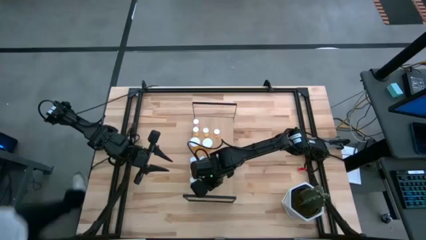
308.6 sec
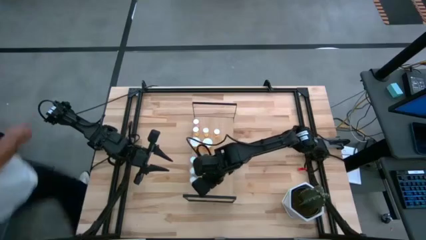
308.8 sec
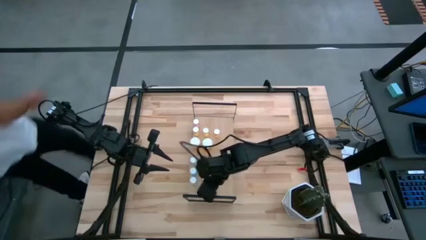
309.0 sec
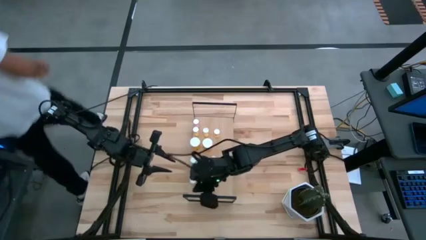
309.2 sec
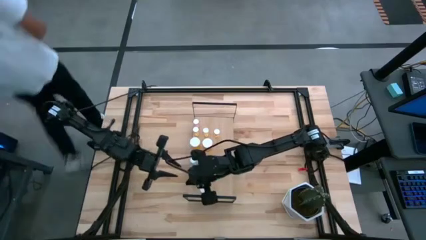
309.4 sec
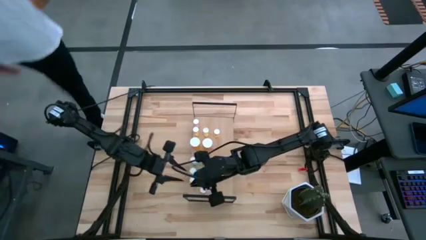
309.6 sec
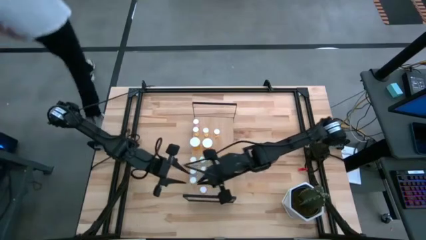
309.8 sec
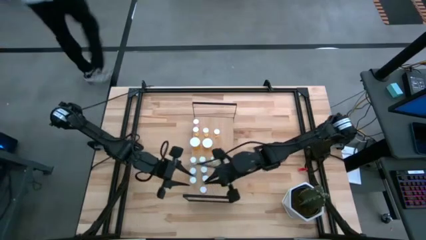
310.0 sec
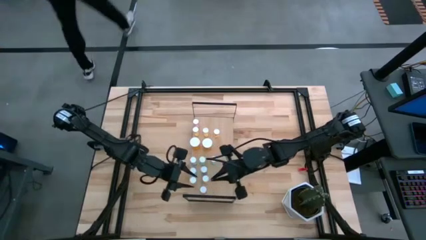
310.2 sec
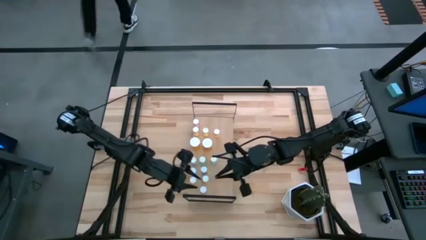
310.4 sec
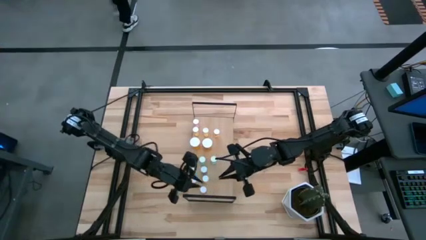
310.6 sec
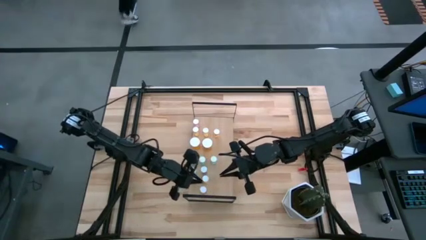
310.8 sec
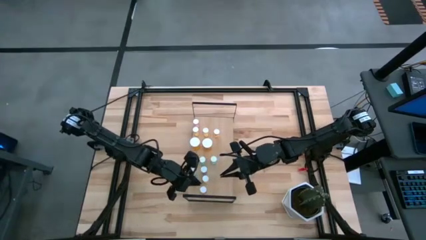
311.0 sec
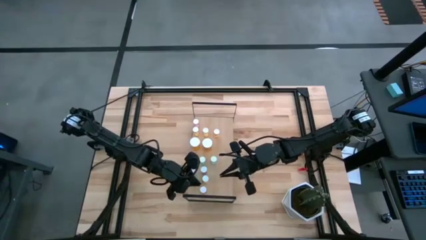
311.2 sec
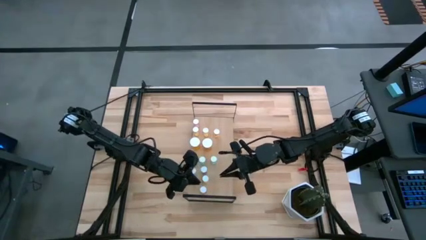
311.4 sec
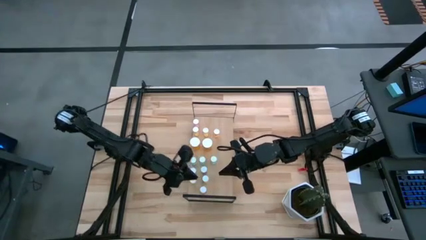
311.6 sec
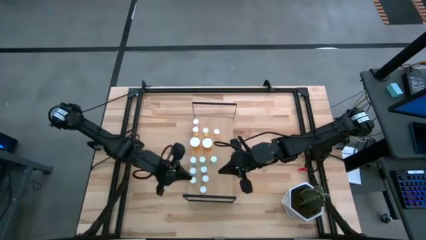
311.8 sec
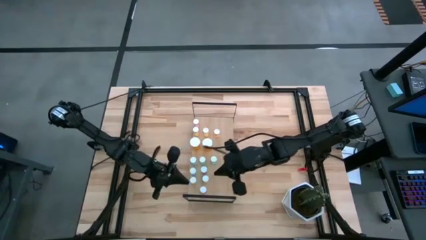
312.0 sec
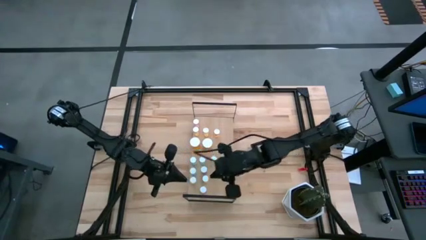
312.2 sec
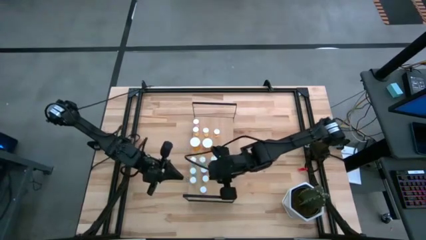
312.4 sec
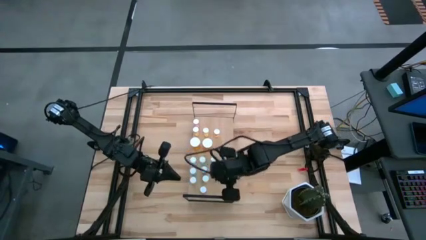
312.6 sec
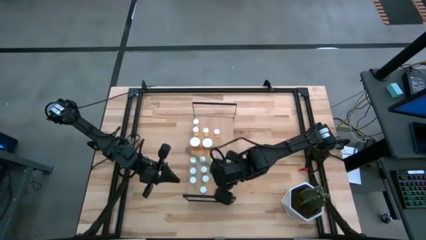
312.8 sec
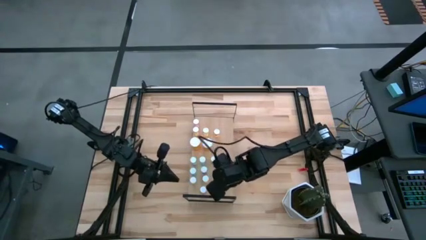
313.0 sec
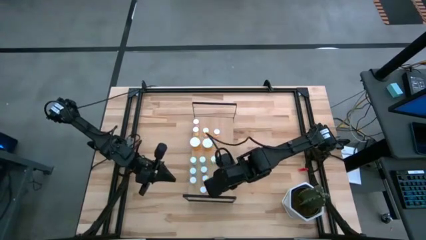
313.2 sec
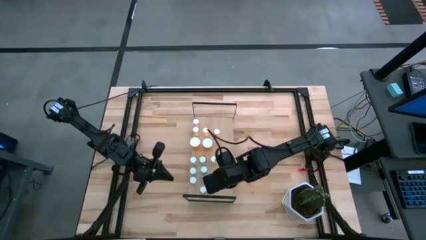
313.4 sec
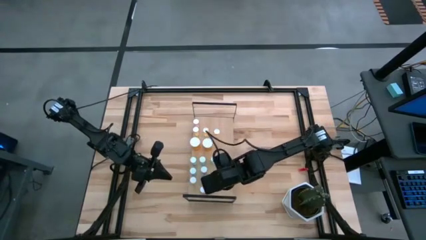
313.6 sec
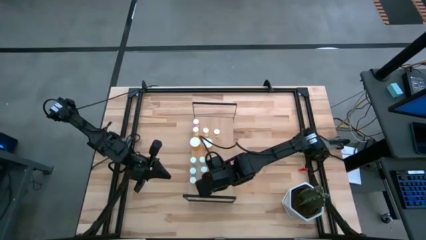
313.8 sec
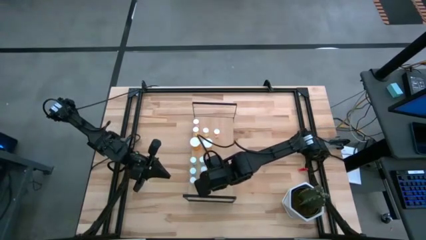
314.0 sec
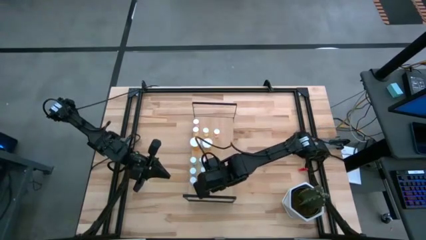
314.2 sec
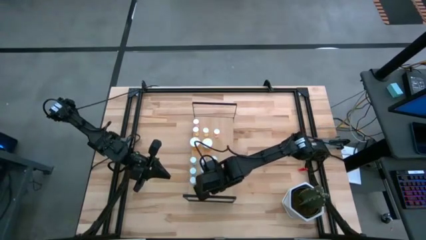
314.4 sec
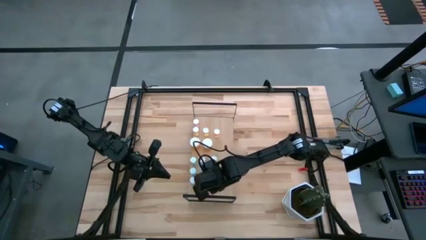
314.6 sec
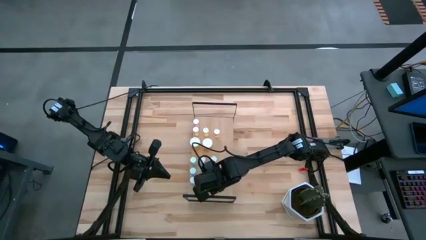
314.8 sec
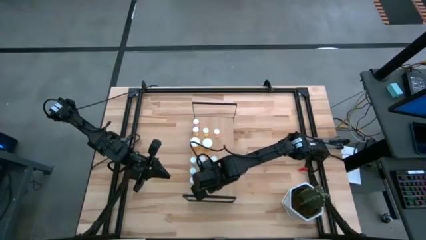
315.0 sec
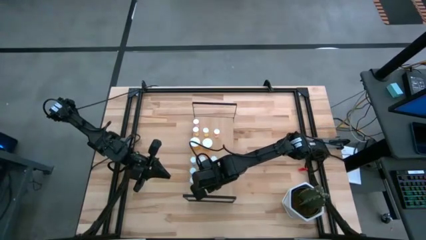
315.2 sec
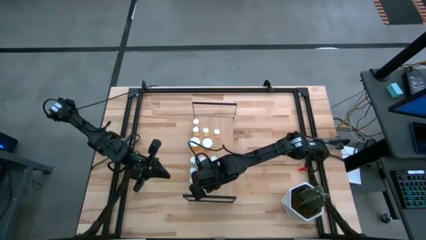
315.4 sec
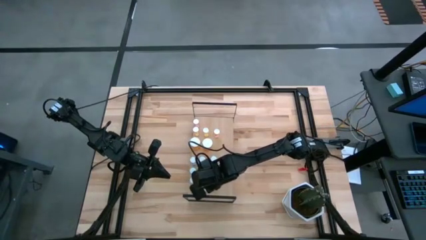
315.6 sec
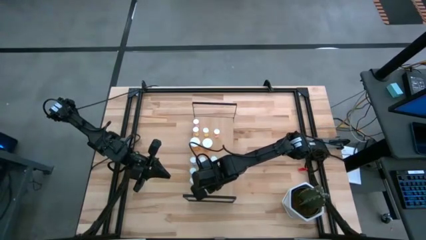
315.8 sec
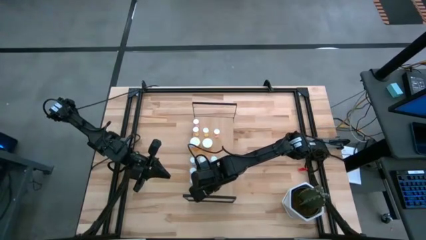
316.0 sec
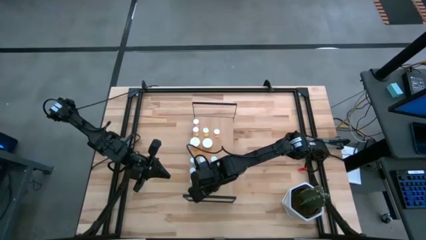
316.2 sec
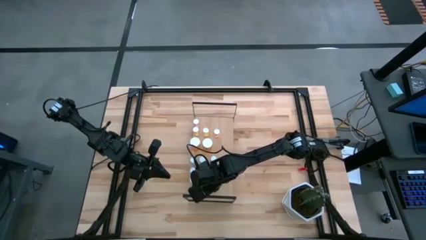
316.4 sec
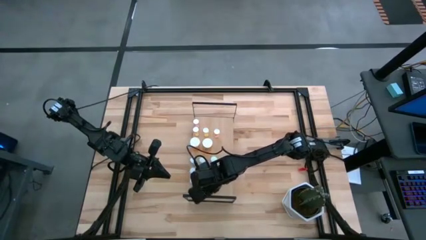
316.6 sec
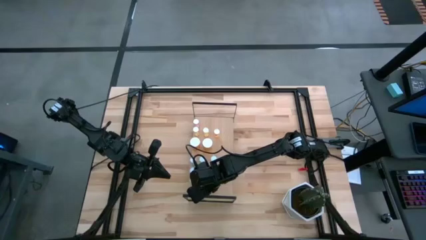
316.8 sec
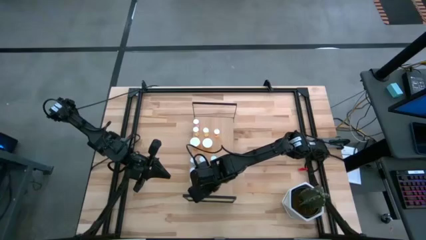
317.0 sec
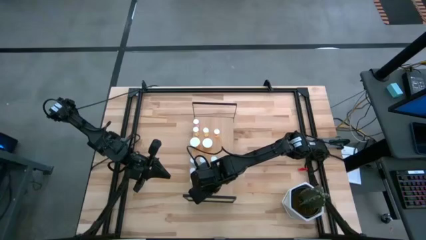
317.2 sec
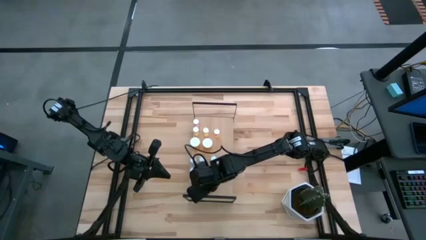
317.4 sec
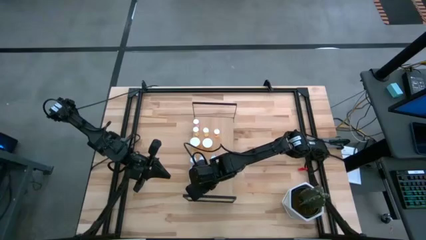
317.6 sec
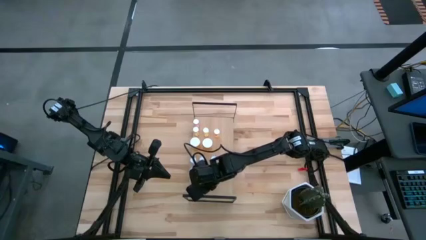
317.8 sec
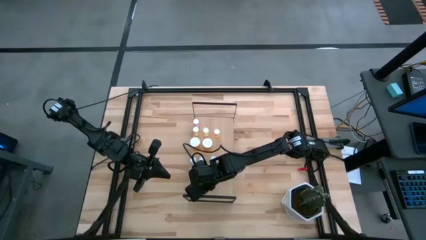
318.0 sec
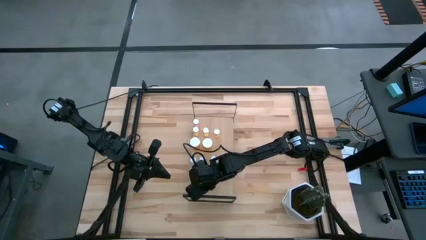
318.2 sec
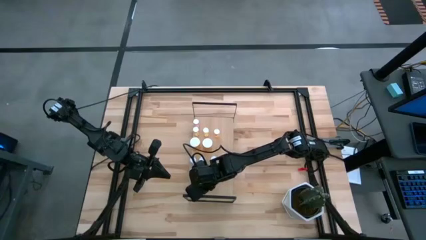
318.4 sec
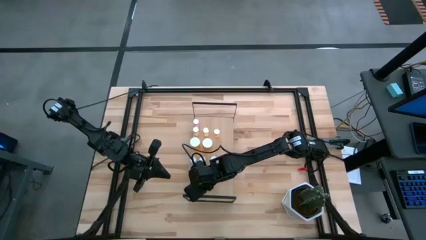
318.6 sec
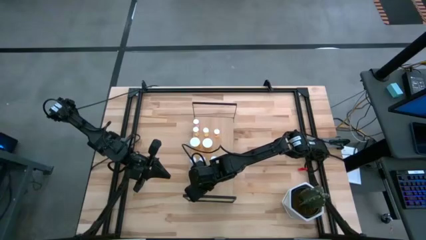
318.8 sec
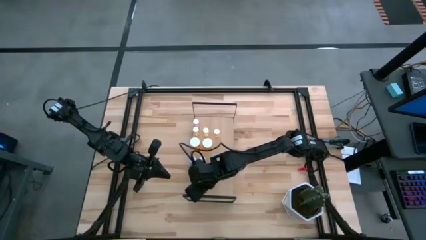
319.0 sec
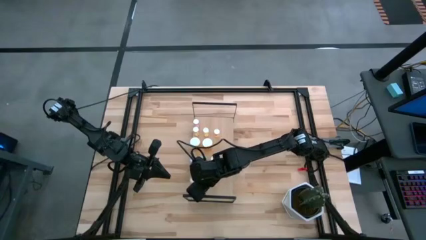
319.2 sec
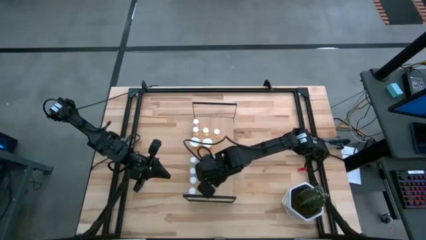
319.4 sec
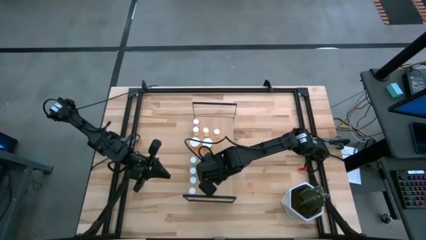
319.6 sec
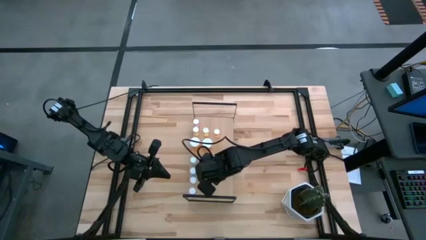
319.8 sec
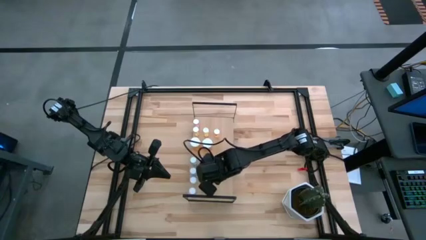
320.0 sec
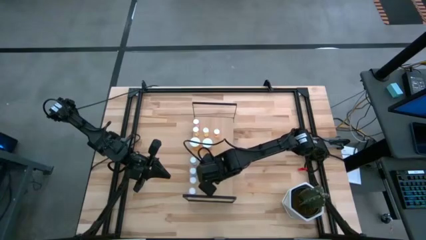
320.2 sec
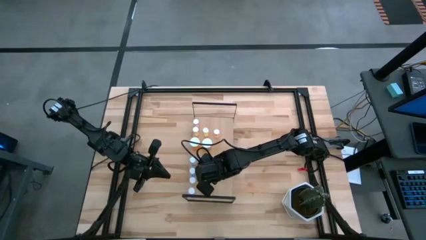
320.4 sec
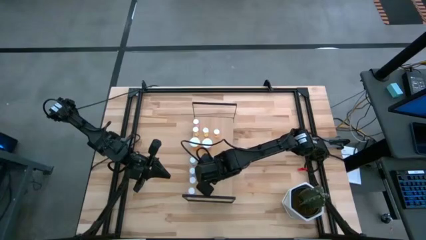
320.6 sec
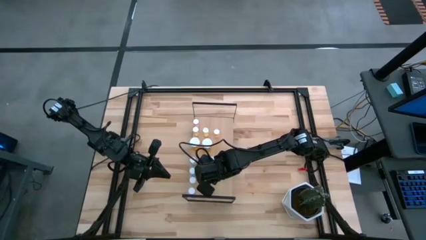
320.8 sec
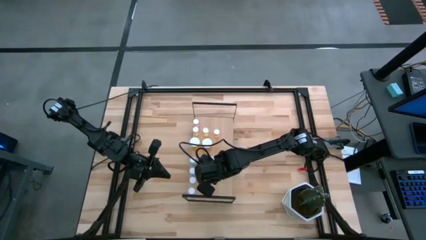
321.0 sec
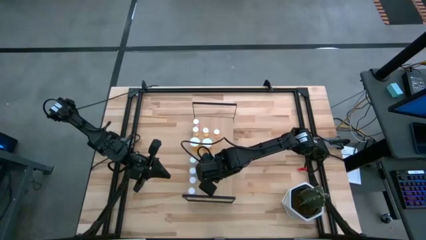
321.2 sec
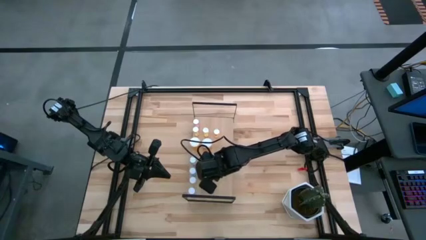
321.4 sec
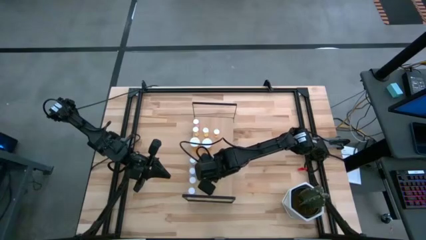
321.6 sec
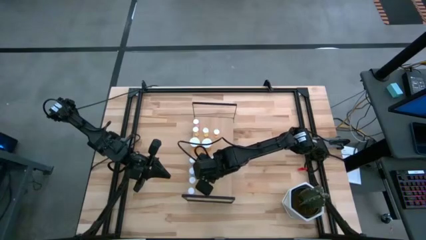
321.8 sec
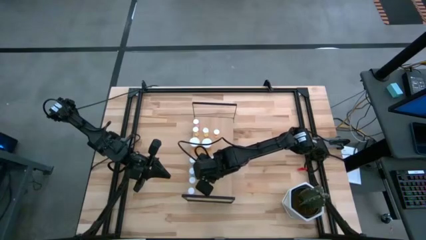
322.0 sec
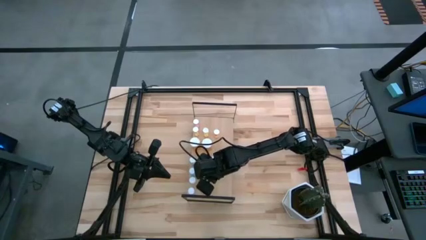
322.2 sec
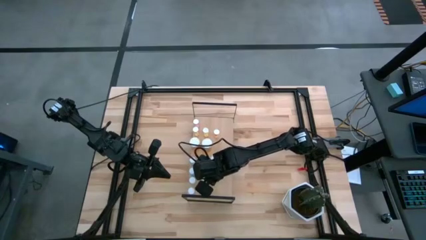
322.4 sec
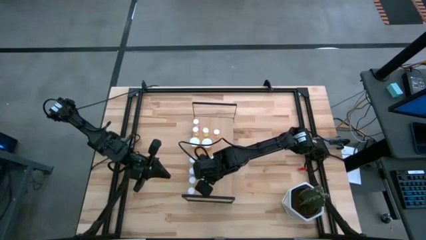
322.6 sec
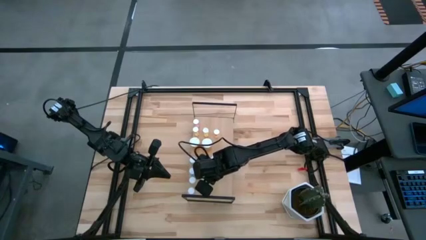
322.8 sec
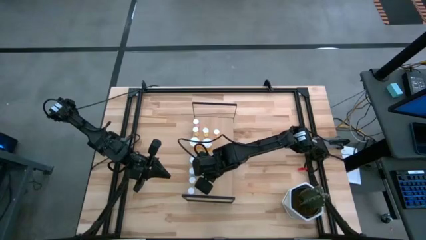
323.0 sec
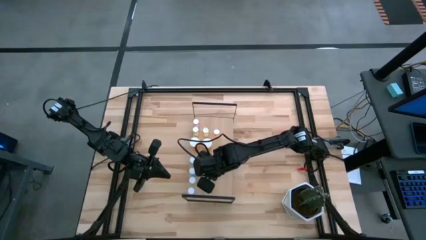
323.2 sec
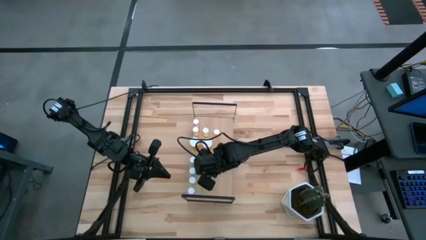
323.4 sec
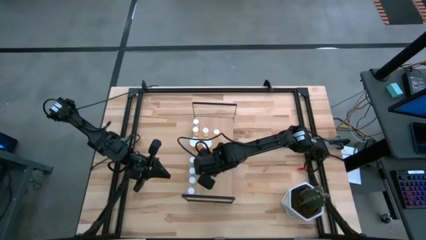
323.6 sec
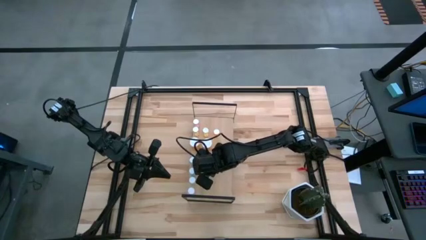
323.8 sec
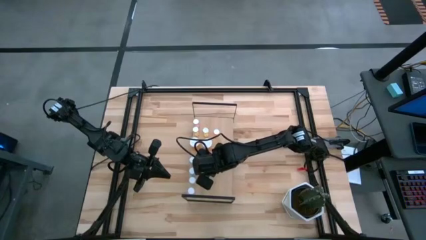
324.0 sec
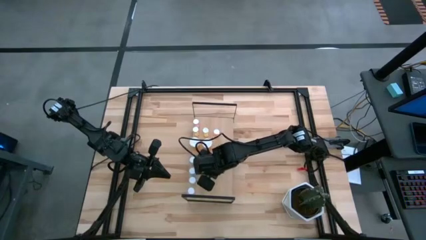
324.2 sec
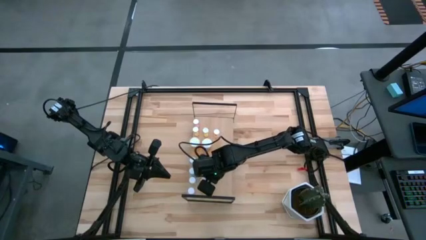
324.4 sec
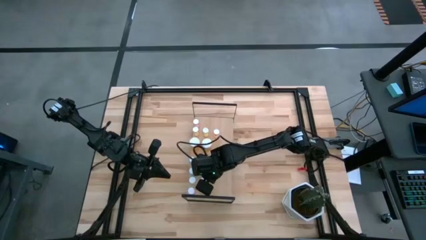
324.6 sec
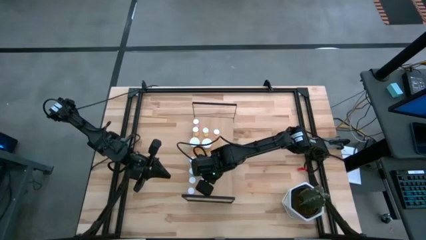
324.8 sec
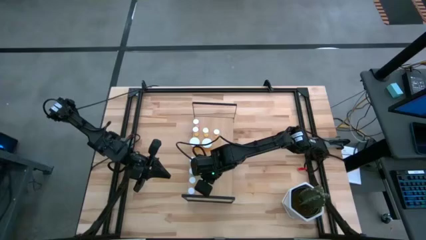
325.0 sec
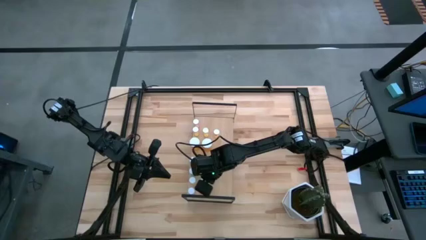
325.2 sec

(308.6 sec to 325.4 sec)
Task: Pick and place medicine bottles onto shelf by color
Adjust the pill bottles on the shelf
